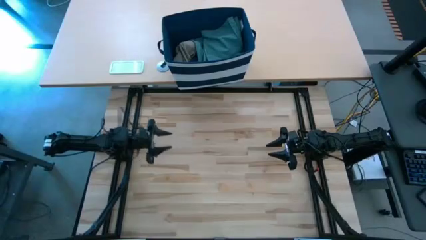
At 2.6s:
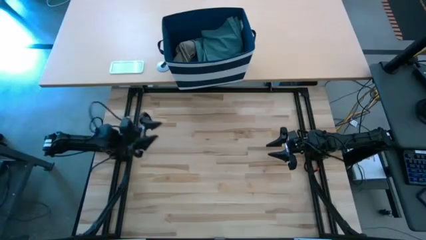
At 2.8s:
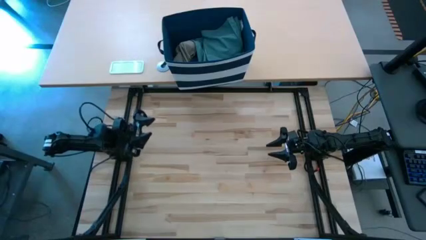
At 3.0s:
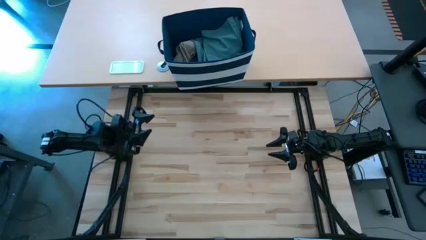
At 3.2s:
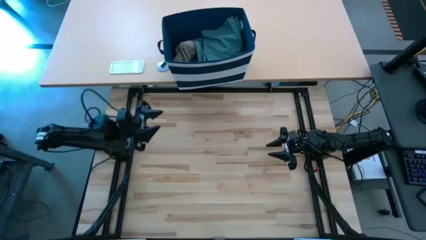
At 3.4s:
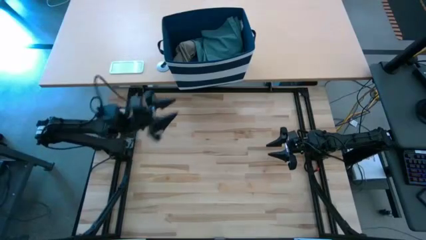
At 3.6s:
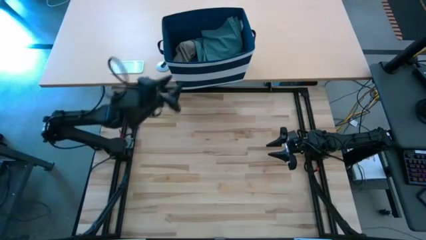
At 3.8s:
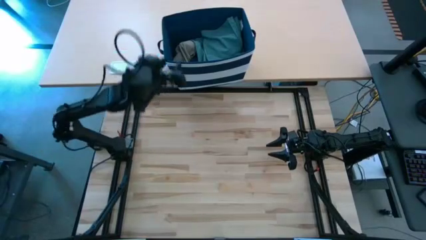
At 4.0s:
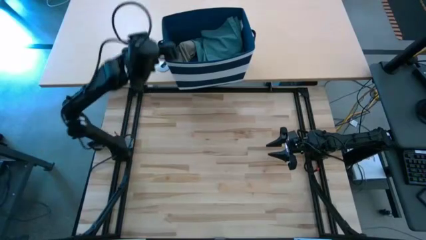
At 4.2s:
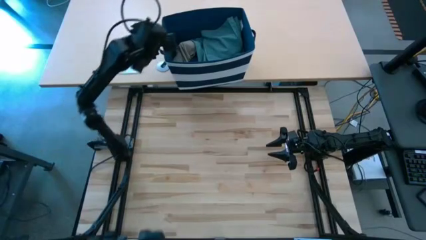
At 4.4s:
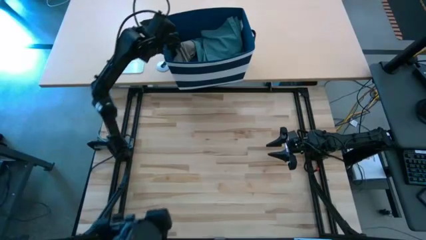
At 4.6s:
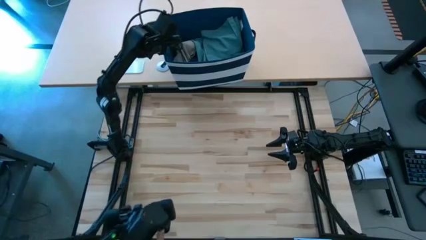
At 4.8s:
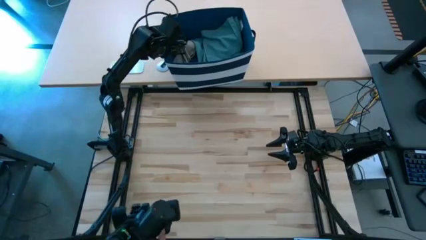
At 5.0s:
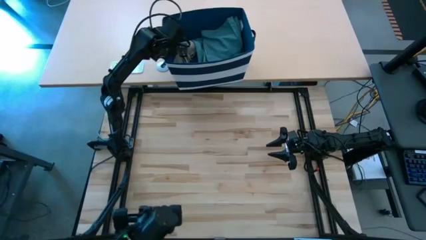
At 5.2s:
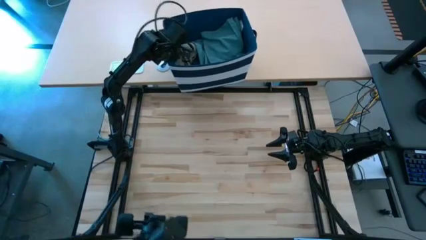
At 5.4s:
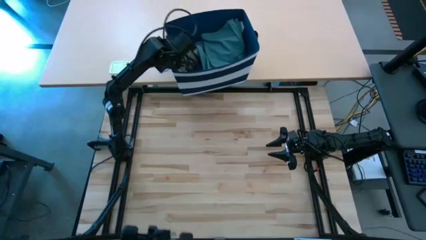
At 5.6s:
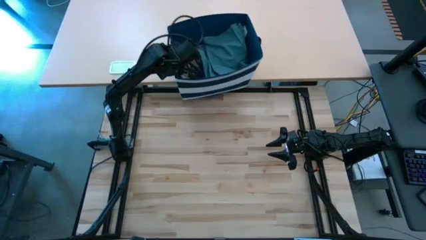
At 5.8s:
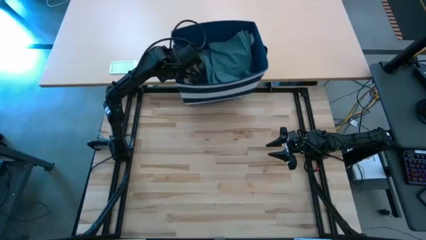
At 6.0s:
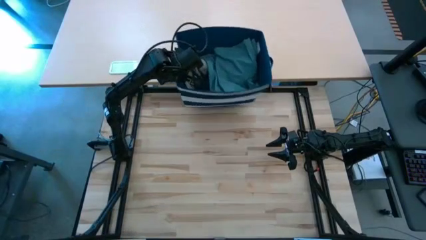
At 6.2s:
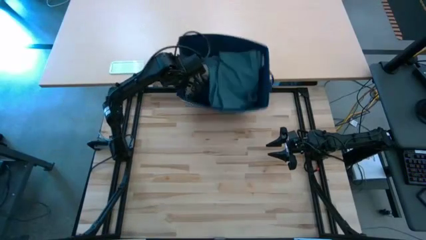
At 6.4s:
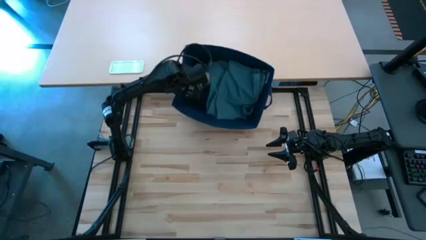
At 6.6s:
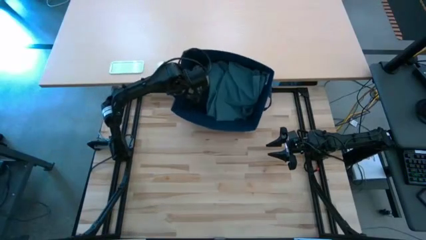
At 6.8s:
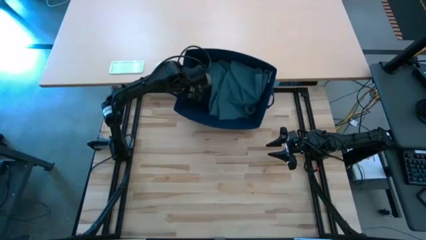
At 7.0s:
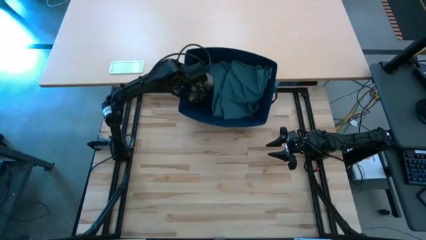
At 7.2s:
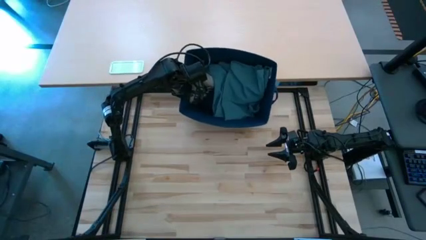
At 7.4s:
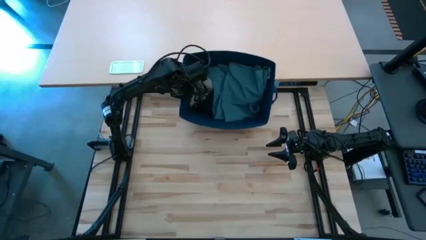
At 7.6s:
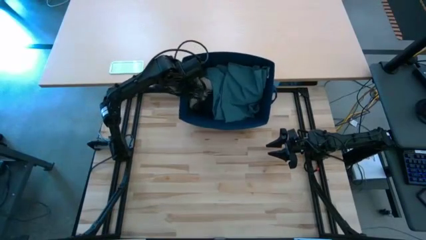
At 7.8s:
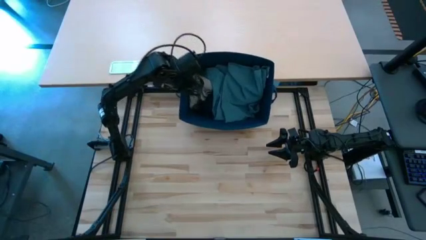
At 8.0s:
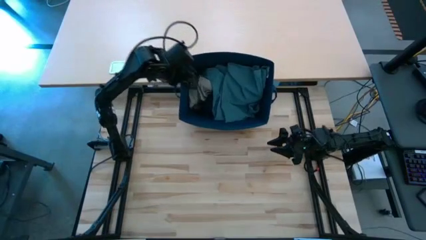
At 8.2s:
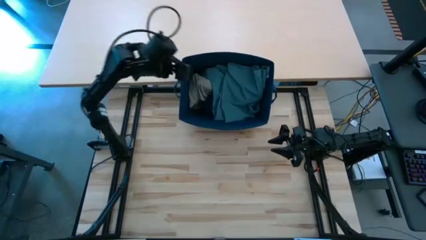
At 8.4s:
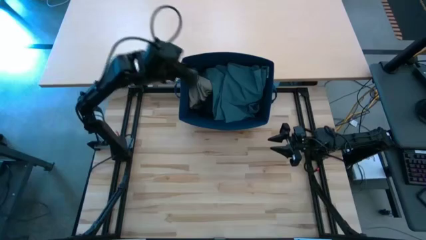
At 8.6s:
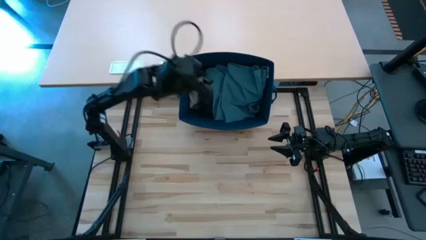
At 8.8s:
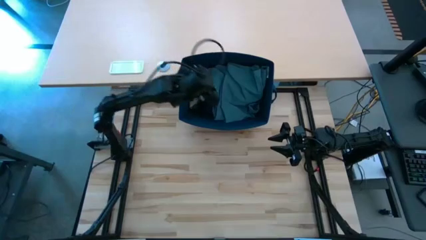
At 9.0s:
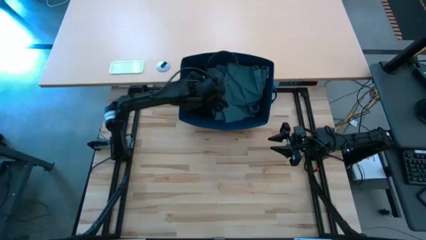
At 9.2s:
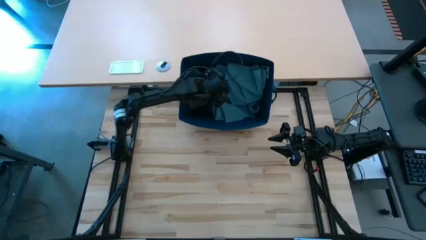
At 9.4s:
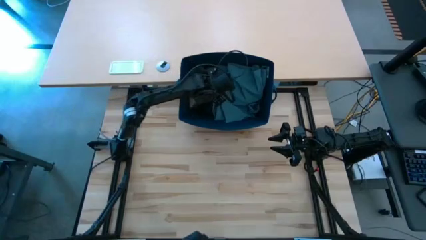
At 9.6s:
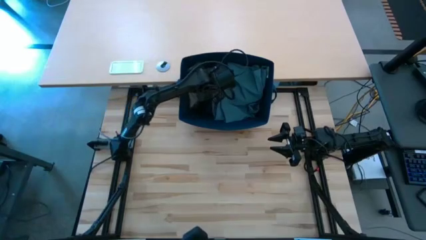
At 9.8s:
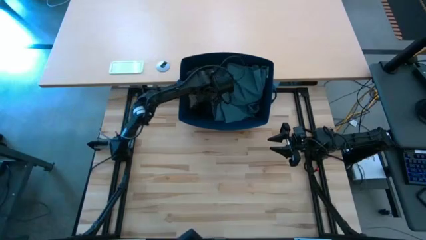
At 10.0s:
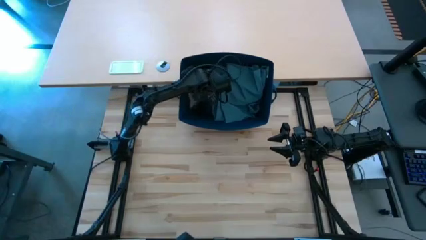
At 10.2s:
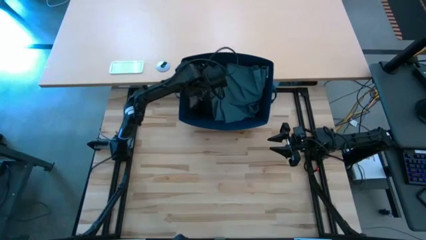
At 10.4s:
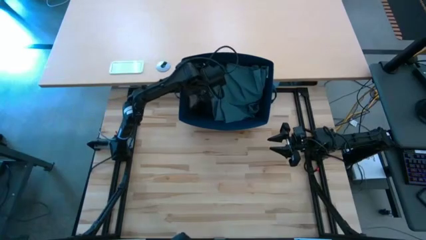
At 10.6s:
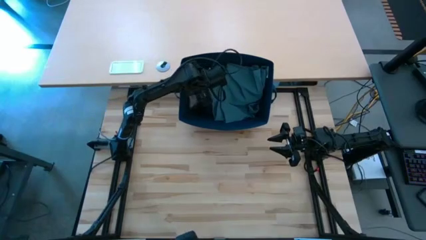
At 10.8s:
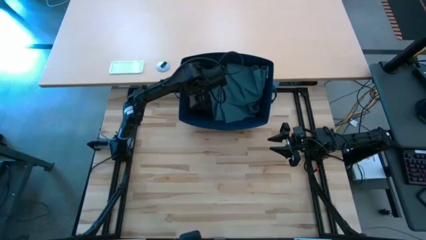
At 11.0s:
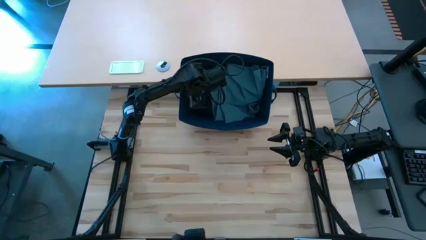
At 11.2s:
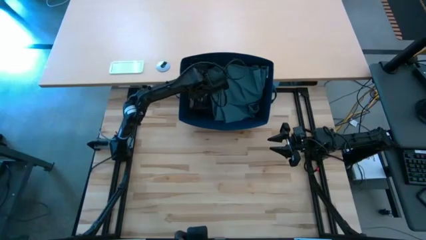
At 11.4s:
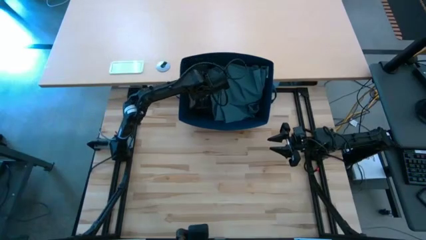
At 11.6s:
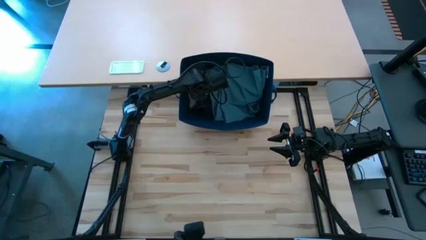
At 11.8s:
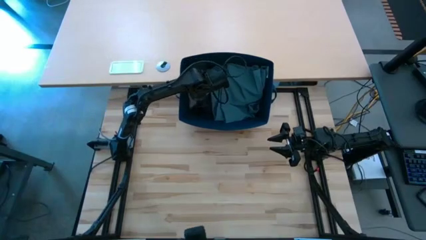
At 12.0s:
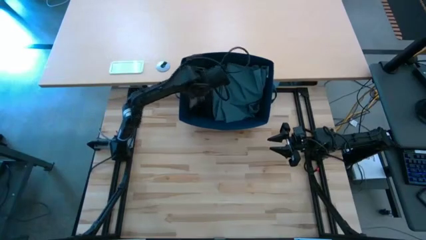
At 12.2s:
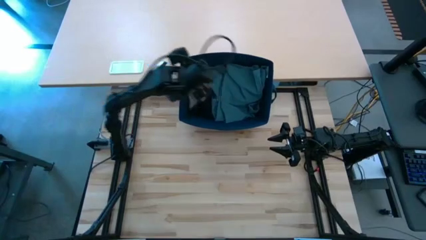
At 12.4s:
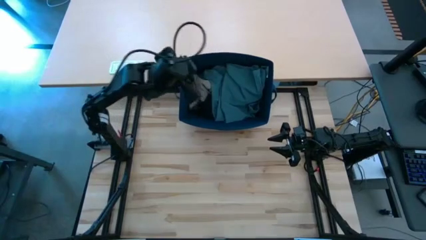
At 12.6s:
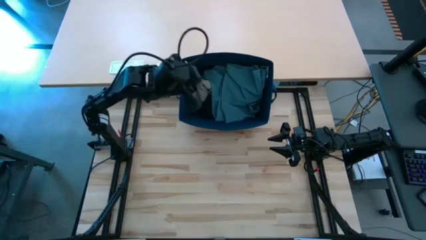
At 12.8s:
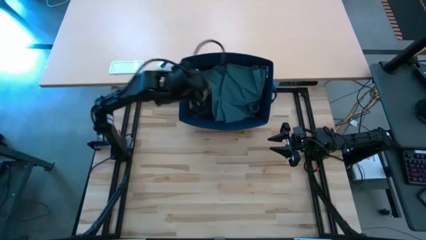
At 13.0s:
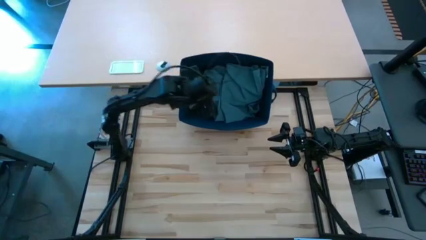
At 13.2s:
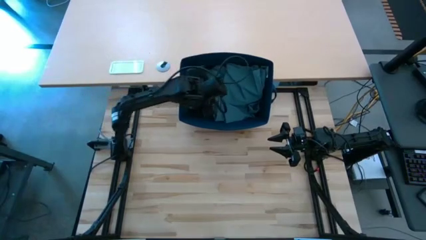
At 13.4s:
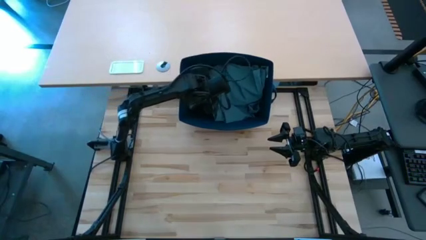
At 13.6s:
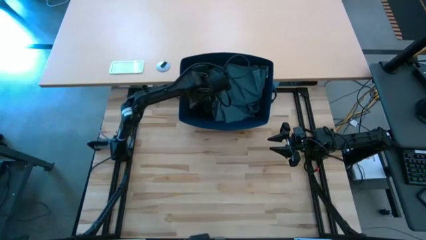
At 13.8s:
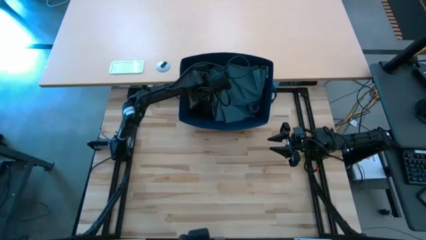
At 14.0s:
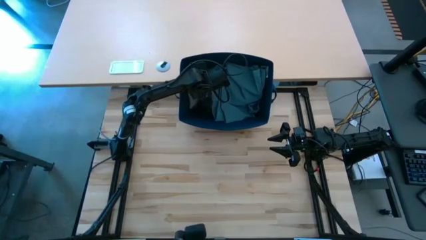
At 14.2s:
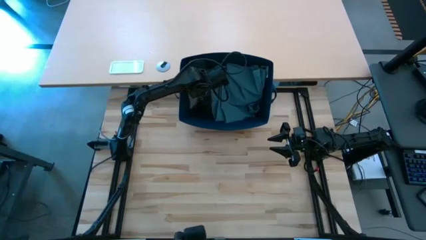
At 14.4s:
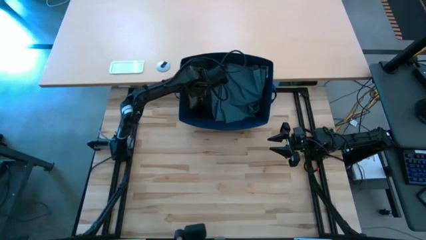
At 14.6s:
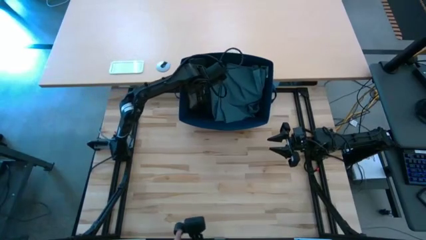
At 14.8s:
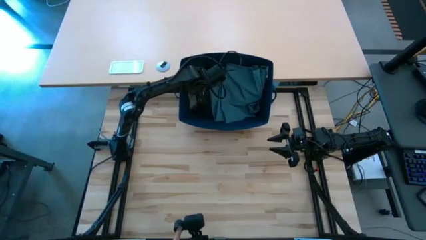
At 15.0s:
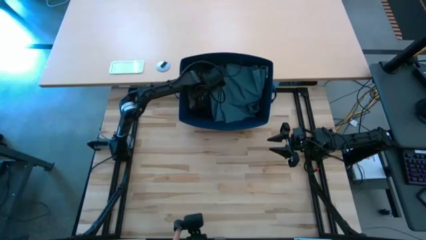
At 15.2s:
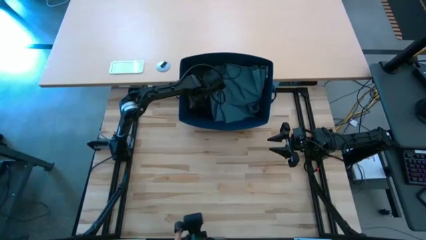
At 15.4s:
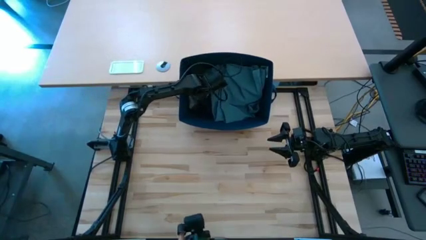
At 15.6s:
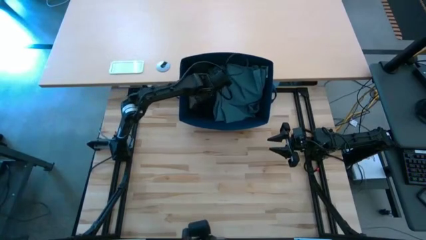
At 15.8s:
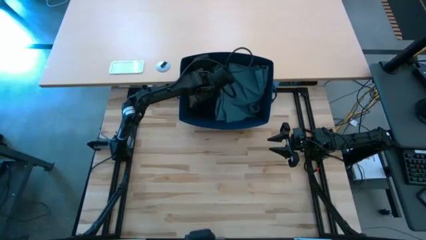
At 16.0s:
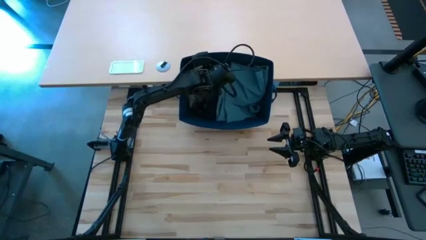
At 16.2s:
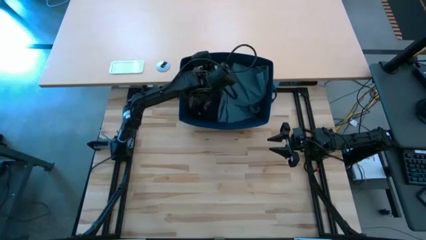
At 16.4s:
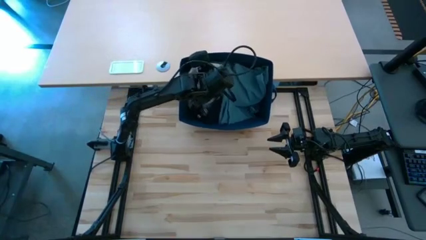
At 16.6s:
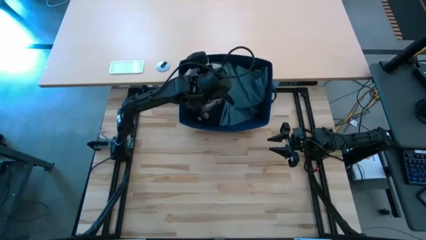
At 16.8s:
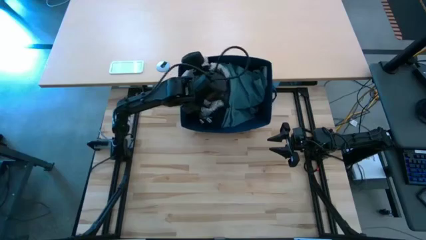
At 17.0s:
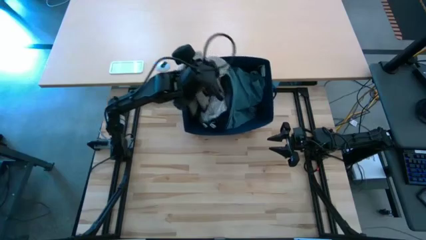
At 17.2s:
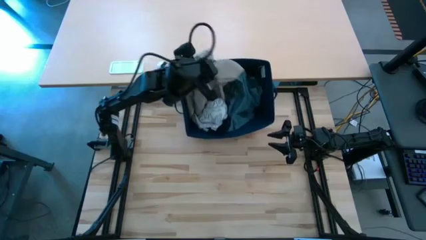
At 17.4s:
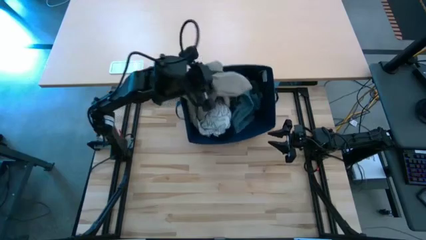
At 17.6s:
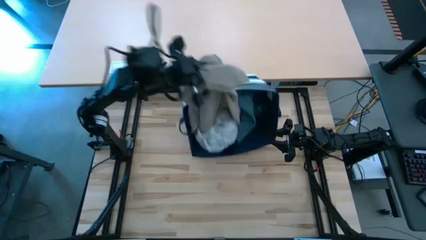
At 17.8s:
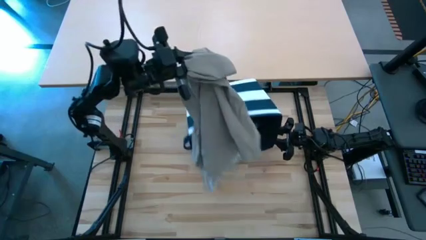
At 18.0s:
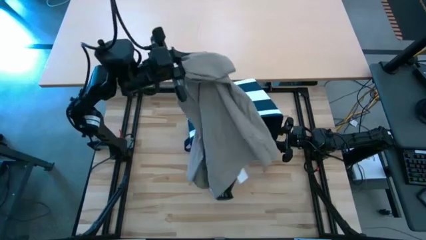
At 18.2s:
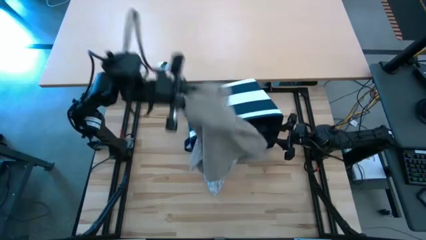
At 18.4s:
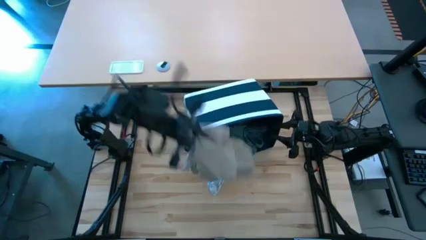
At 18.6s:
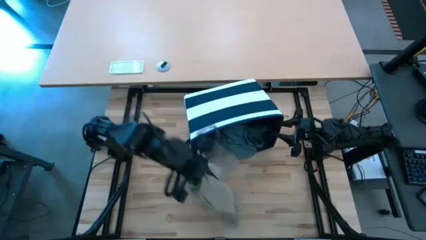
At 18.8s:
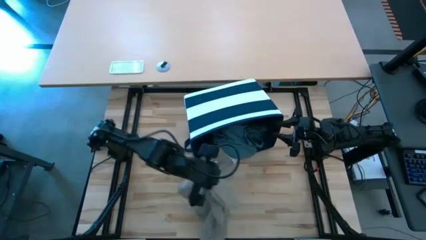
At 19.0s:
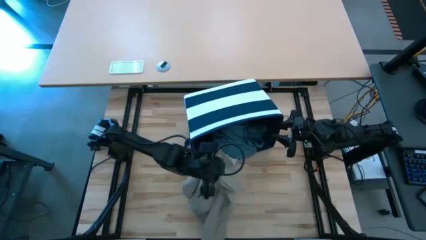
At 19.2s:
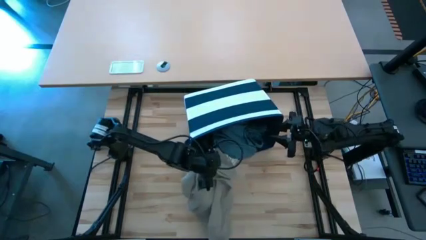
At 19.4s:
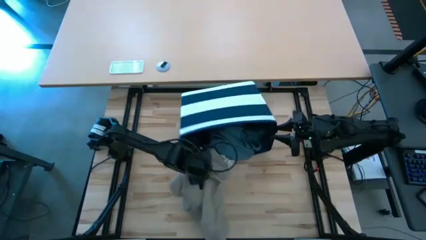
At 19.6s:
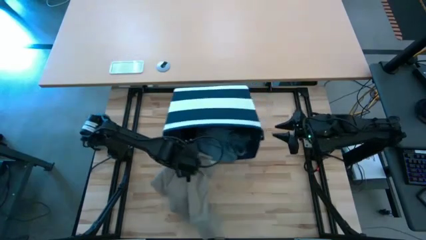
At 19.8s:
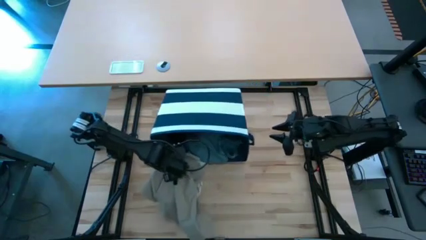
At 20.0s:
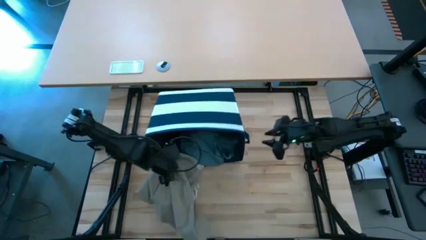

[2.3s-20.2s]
Task: Fold Laundry from Bin
Fold the brown shorts from the blue laundry basket
